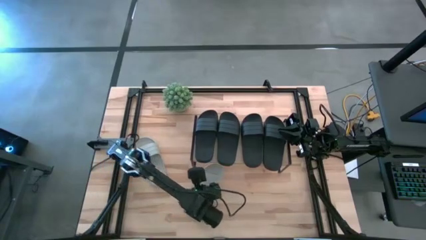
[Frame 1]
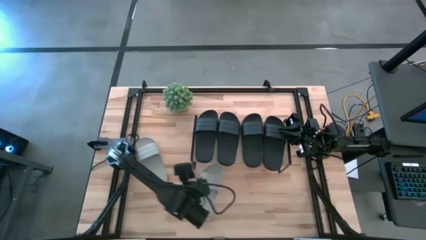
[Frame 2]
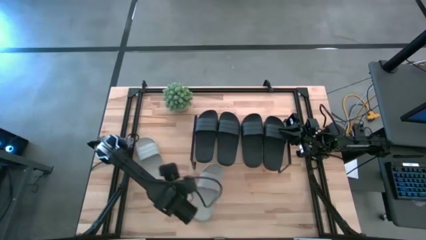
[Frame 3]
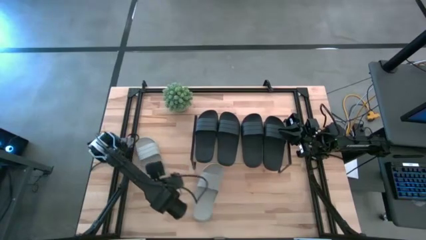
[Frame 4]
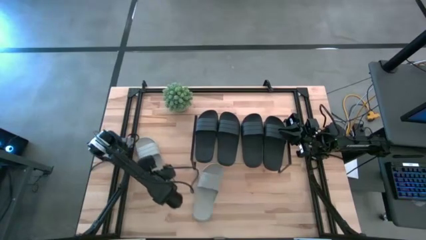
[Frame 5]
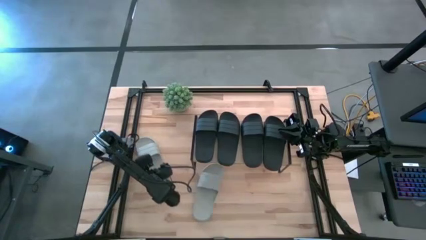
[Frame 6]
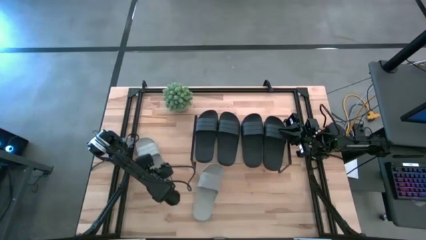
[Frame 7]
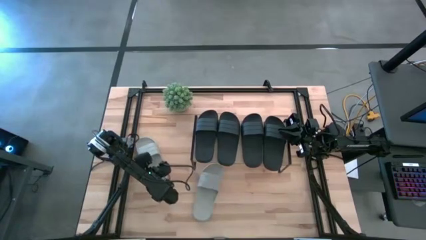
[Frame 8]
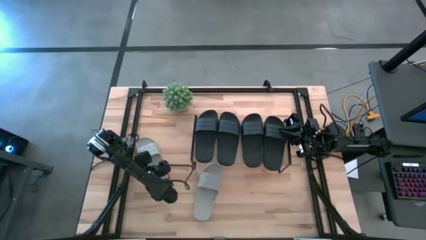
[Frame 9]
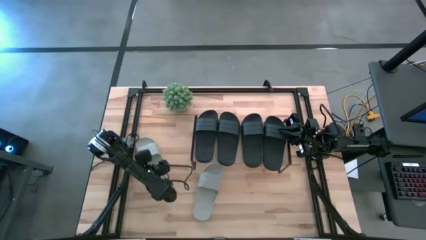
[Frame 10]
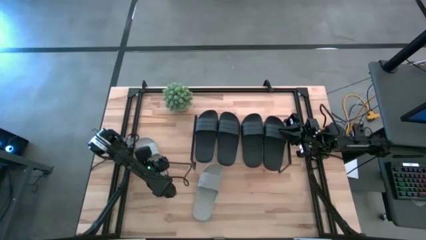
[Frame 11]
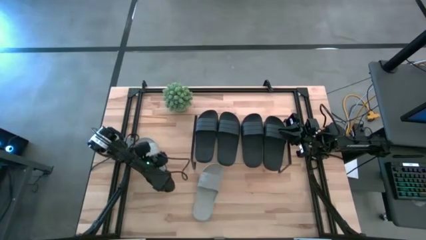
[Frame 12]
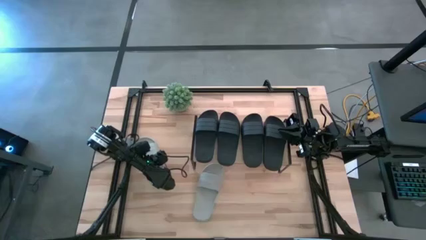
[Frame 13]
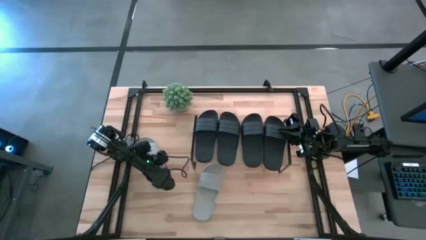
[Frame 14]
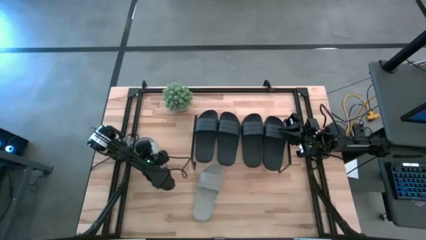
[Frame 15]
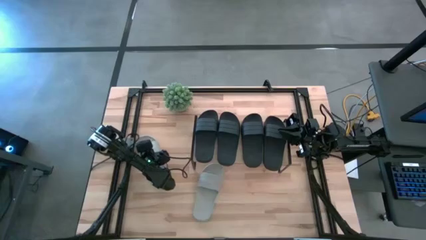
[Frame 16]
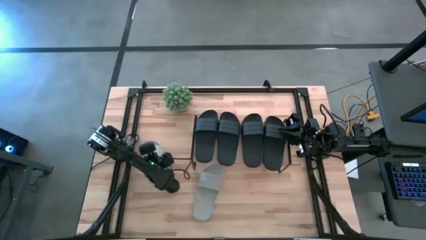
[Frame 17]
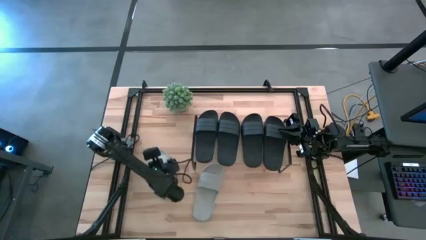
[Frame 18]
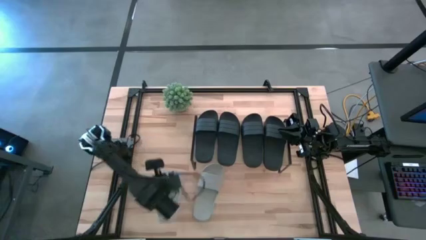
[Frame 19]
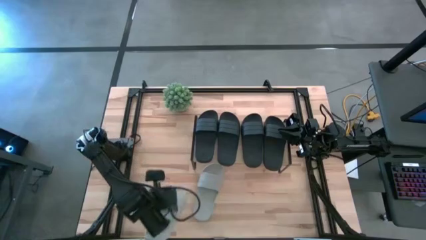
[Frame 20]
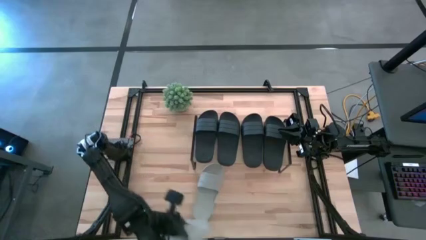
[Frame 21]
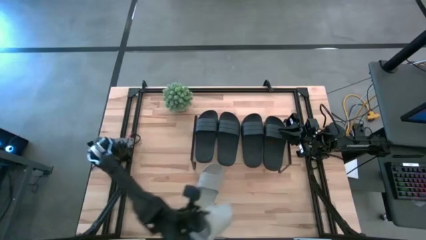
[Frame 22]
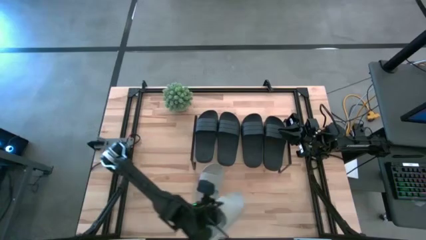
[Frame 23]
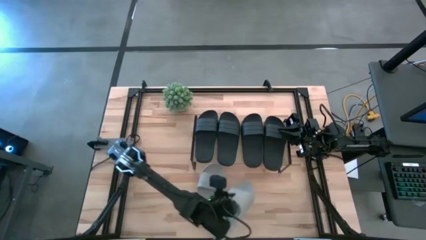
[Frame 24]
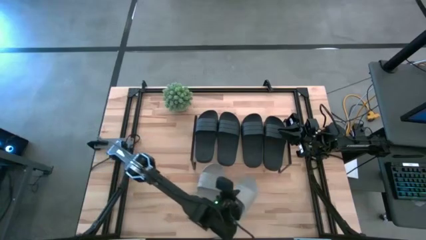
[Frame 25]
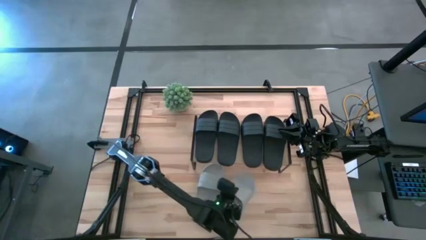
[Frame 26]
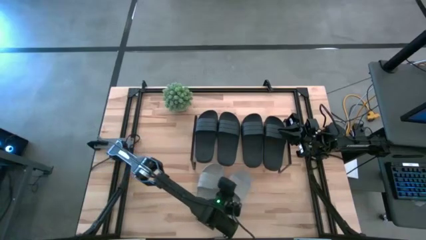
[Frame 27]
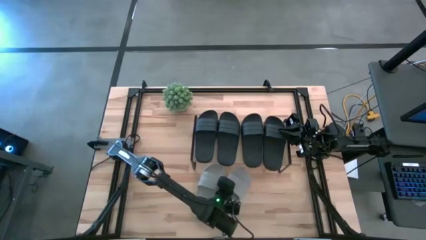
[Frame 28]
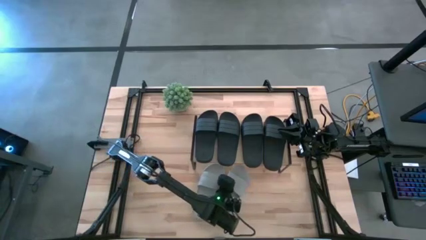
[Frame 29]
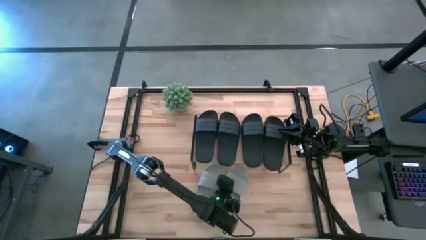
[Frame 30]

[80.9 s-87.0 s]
Task: Pick and place slides into the shelf
Move the gray slipper to the bottom center of the table

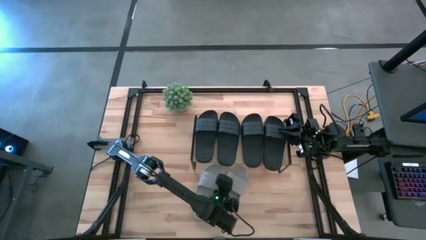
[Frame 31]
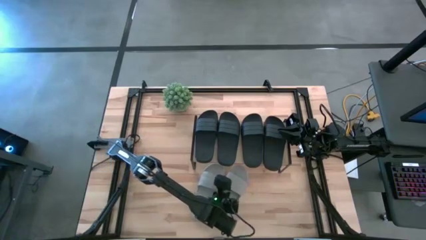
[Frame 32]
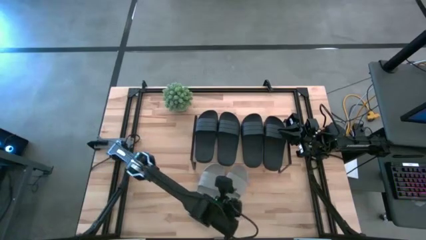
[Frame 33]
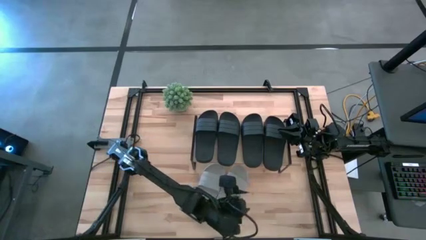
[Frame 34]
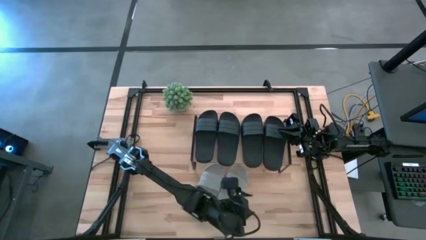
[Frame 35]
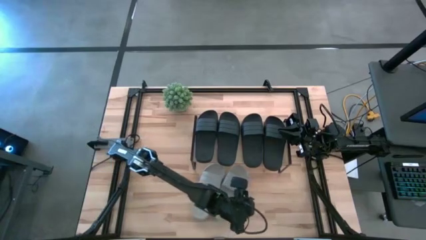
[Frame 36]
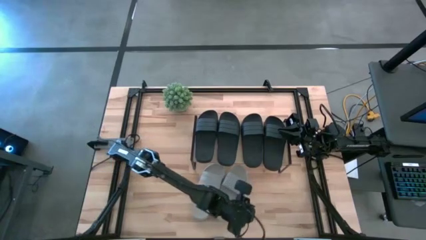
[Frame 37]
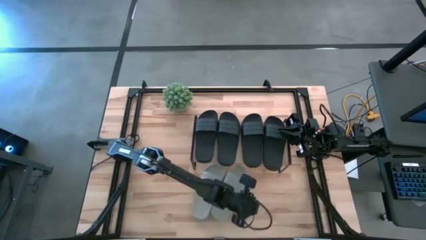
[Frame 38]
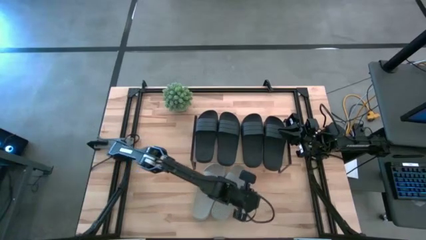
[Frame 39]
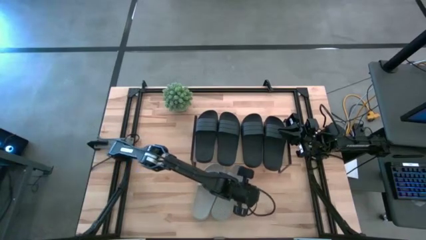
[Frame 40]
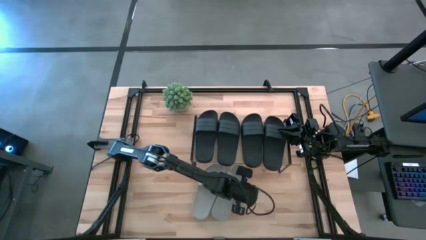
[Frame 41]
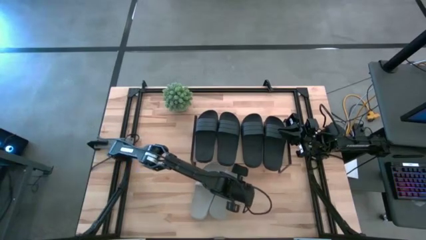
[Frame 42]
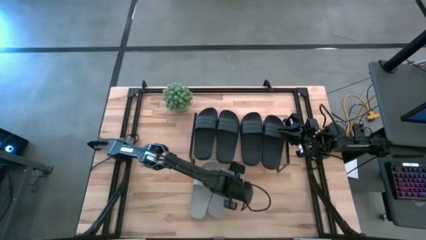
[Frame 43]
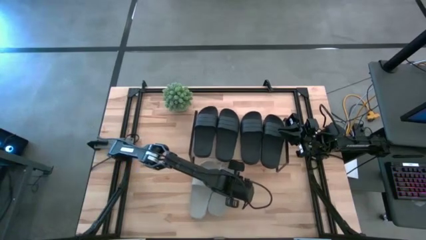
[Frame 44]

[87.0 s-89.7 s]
Adjust the gray slippers

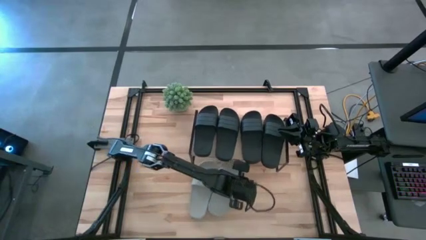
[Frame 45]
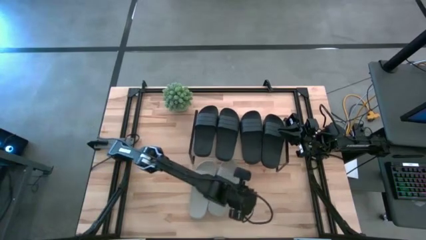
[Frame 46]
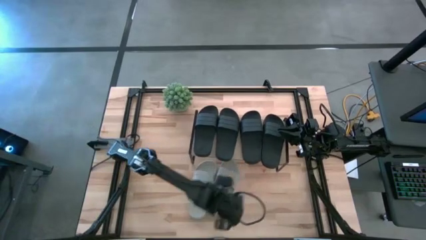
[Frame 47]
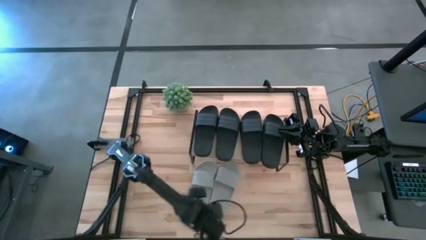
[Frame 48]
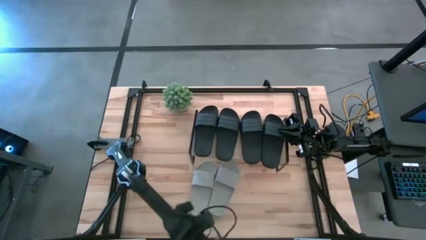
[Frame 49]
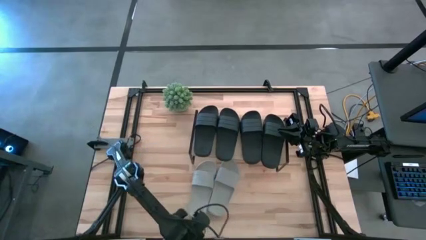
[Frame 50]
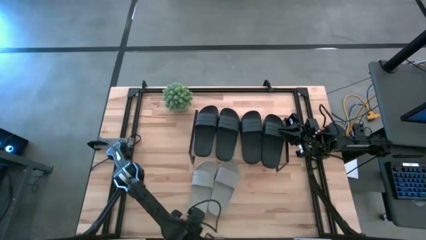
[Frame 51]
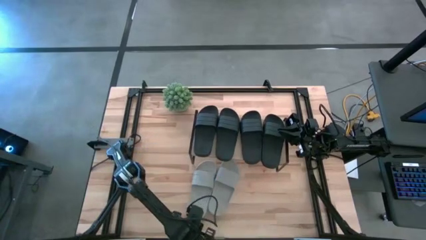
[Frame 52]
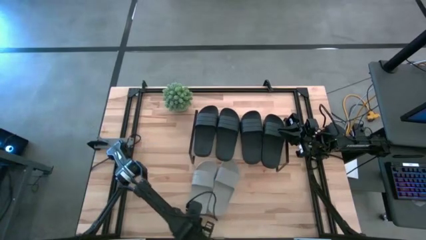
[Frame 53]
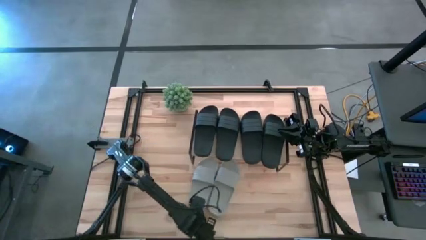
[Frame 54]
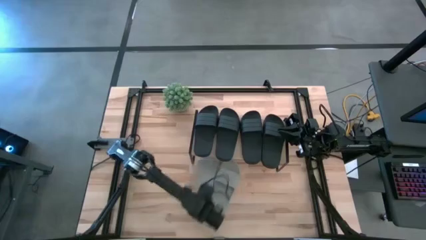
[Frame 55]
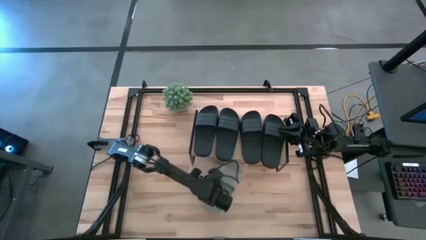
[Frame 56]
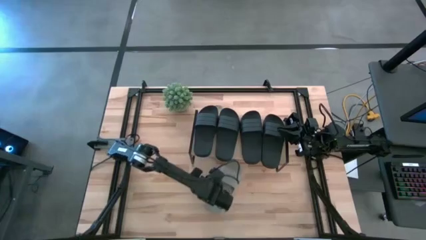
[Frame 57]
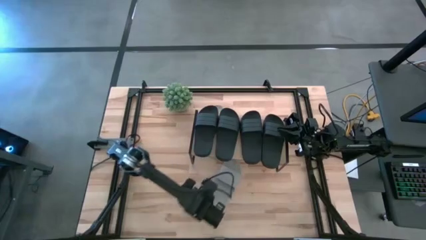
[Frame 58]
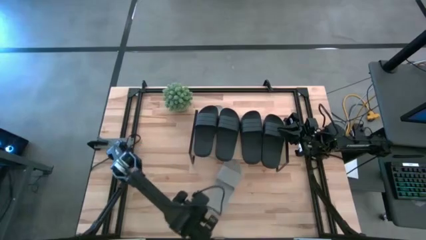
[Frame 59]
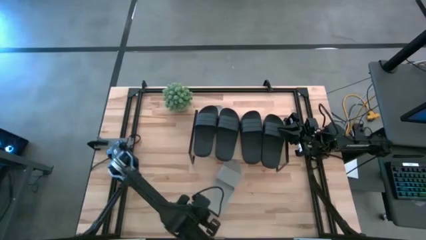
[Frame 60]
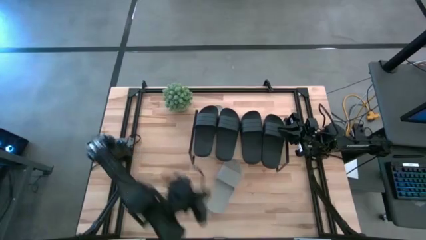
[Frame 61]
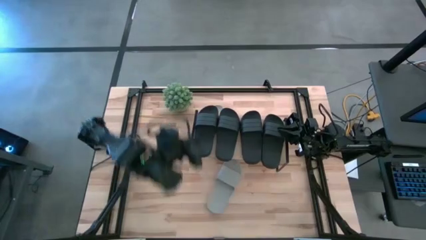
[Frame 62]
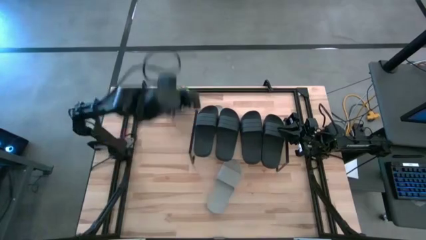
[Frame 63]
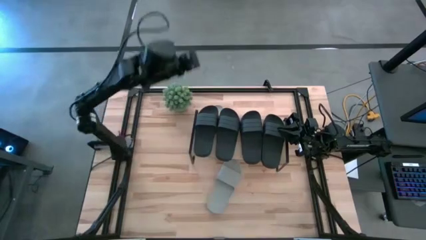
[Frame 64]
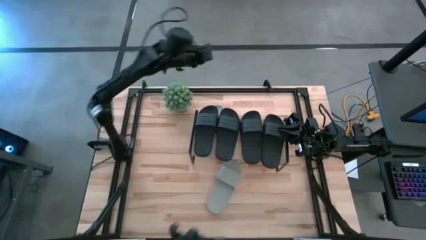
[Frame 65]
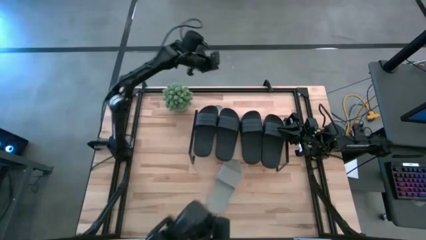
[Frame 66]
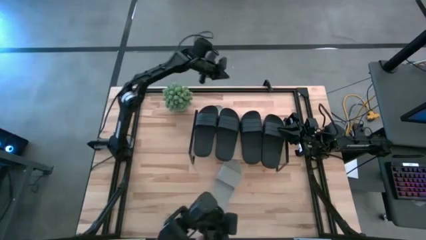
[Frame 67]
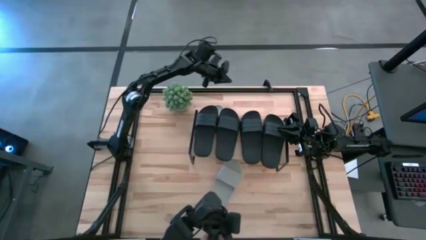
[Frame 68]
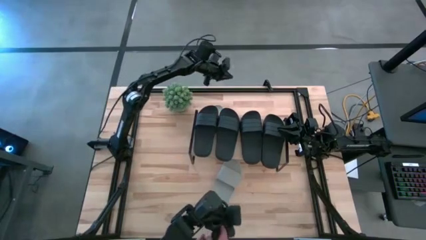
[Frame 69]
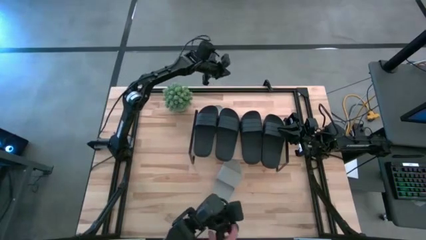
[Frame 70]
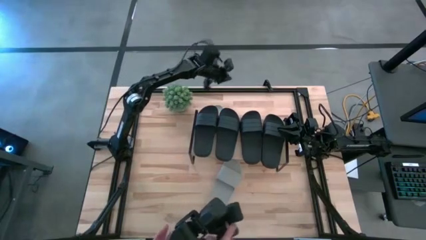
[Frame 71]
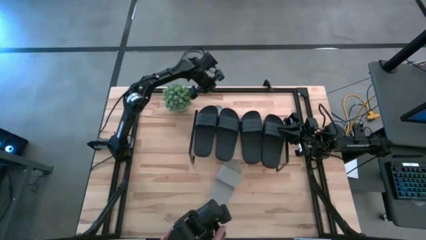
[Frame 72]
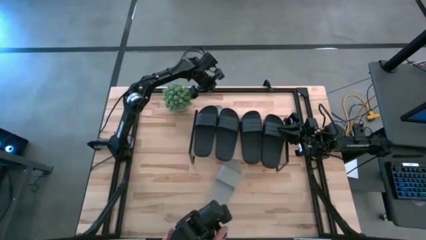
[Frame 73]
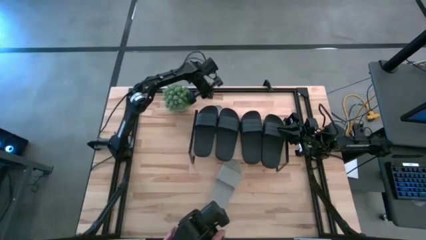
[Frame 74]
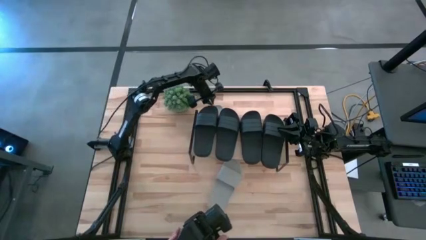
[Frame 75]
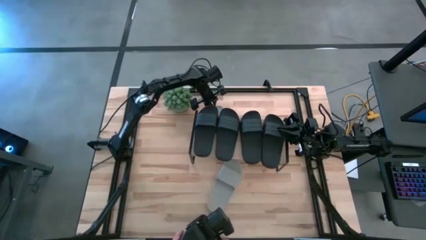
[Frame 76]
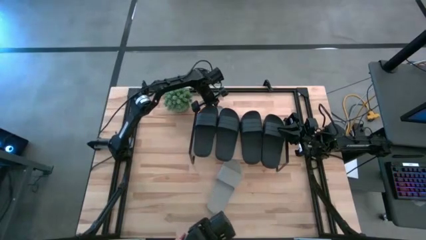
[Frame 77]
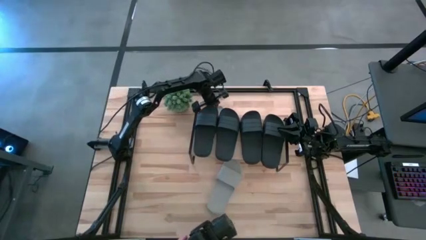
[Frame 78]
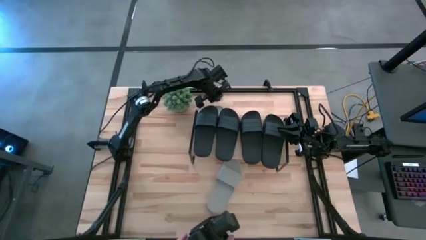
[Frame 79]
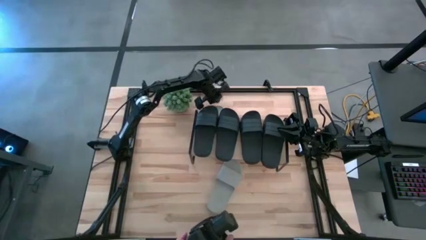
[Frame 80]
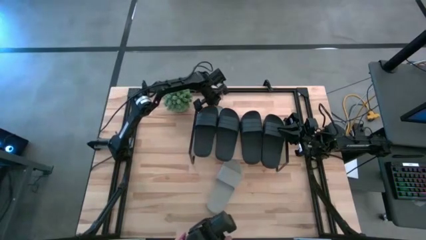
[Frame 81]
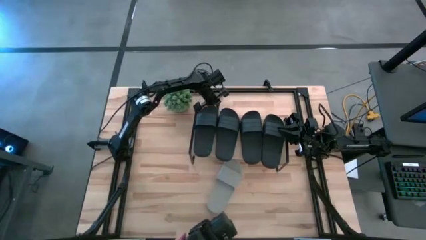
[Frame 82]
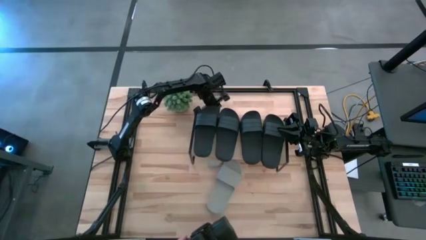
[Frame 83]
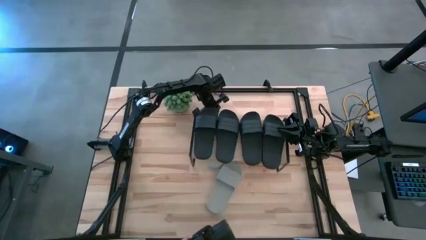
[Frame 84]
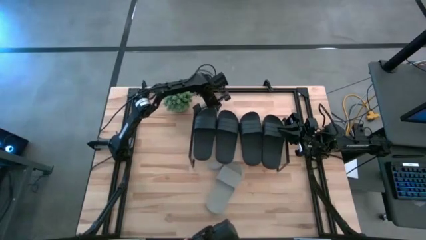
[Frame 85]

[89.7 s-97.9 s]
Adjust the gray slipper below the shelf
